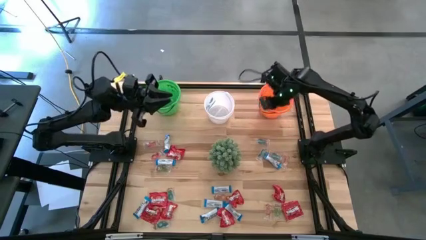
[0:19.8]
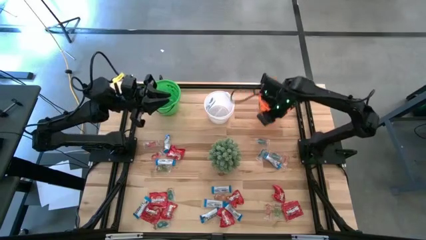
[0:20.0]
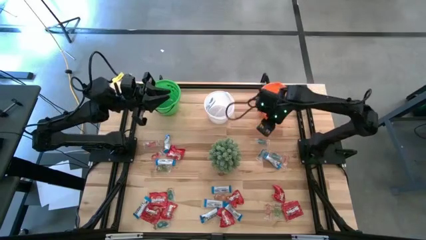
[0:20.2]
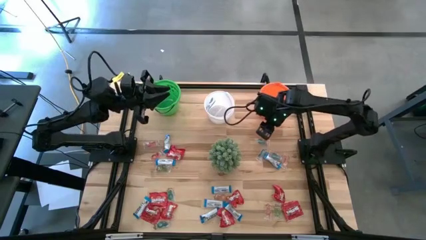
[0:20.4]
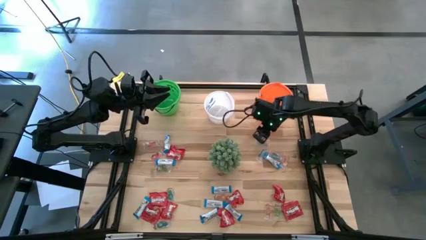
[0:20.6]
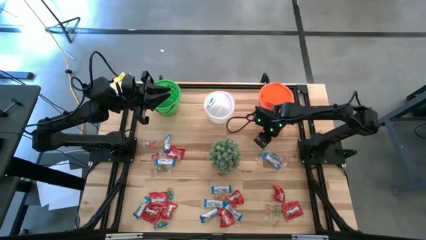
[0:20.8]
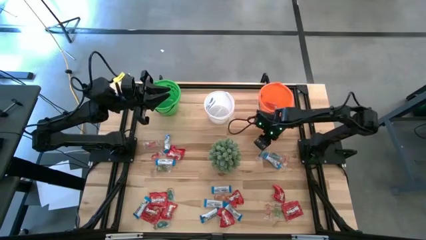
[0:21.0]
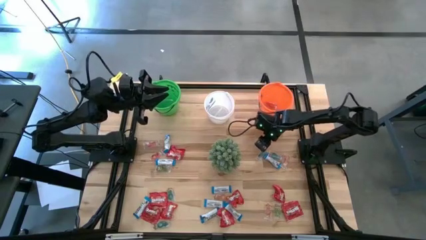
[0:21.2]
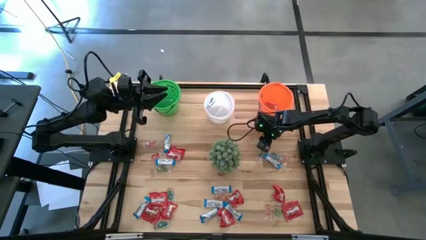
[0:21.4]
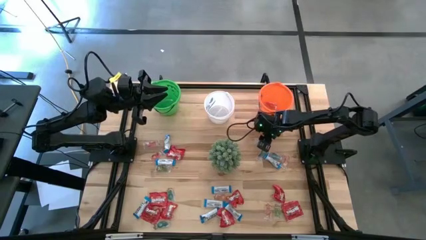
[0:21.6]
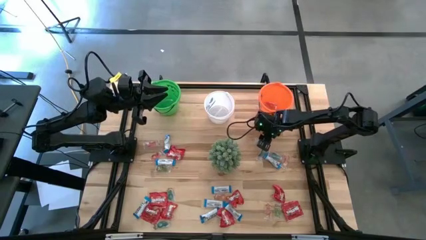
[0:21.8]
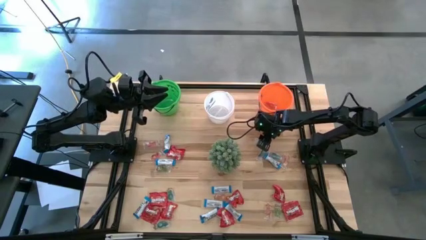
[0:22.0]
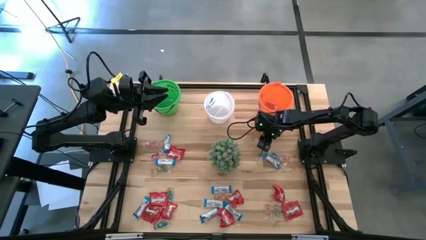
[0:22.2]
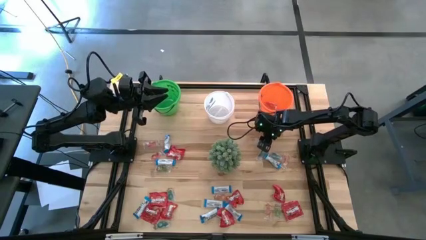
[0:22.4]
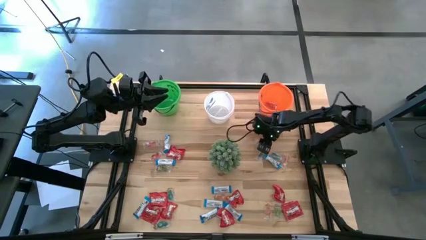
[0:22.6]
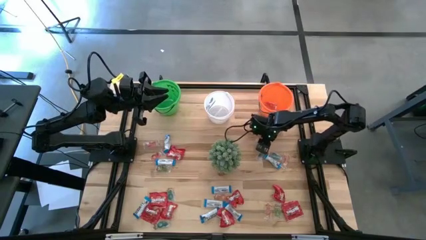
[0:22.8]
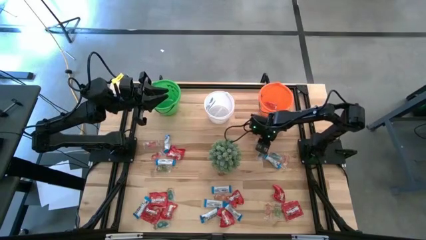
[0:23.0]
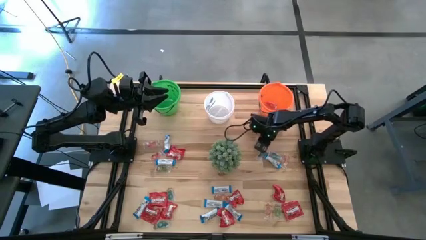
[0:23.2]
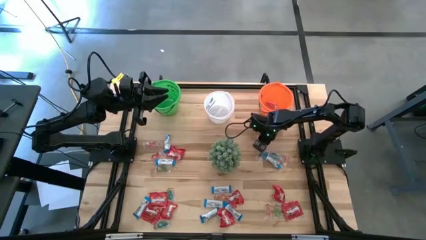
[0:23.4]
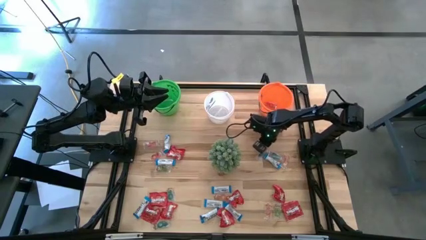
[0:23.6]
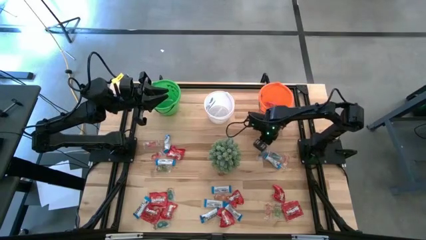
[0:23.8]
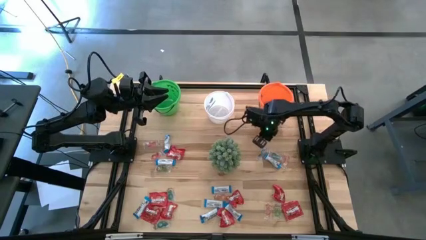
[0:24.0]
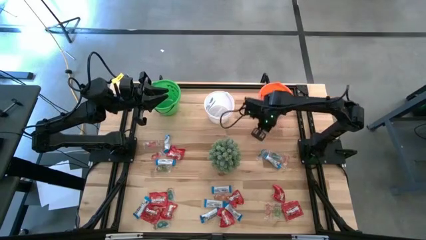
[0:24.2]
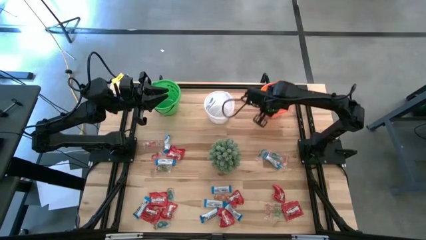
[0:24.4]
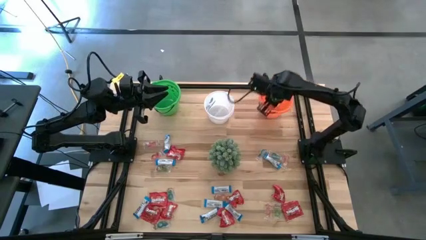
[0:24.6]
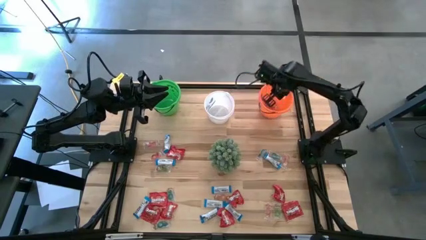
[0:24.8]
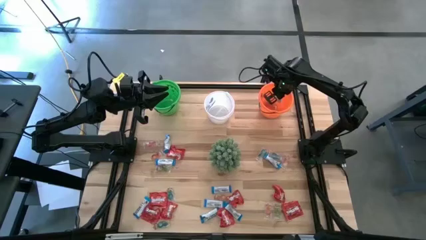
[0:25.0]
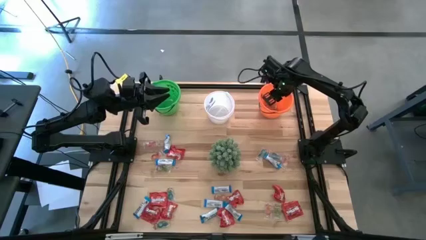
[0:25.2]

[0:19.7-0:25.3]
Task: Sort candy
Put the transparent candy into the orange bucket

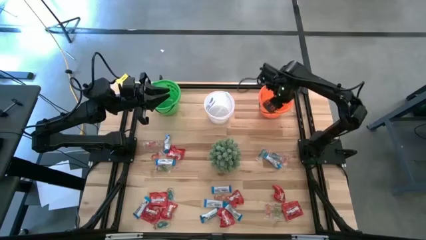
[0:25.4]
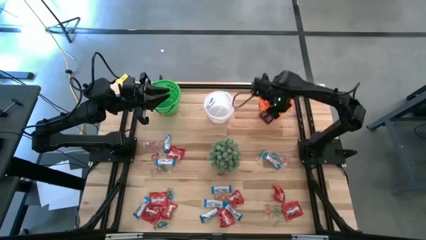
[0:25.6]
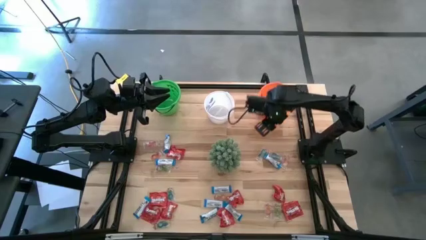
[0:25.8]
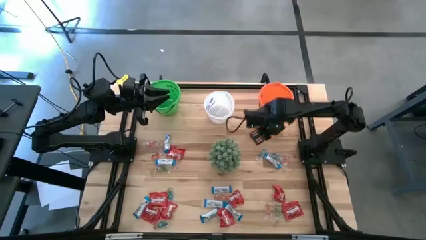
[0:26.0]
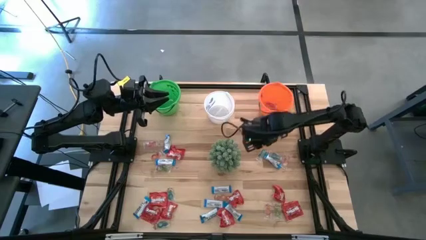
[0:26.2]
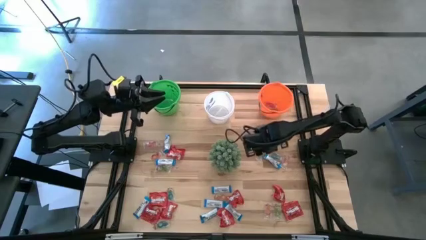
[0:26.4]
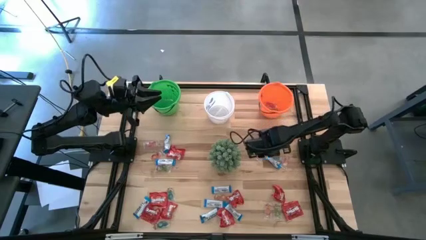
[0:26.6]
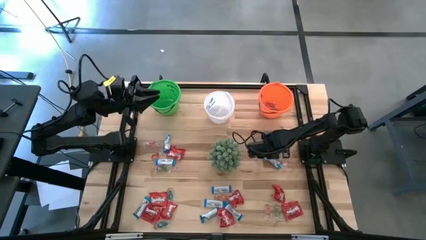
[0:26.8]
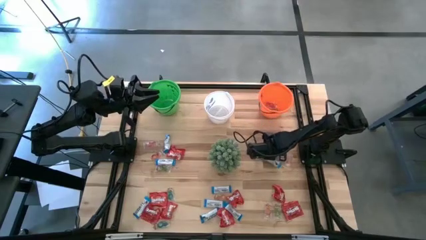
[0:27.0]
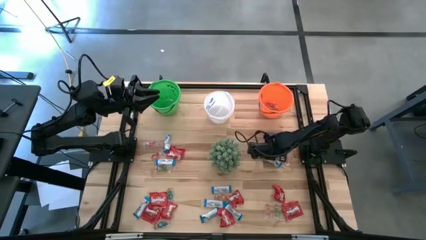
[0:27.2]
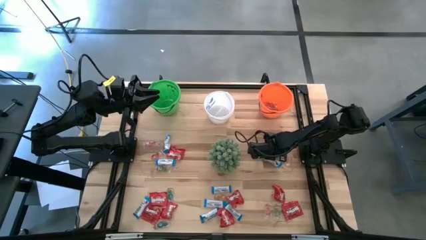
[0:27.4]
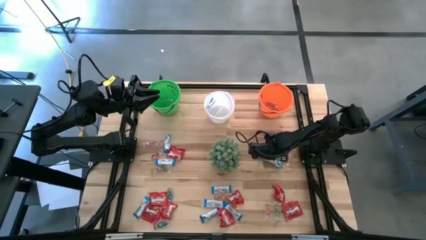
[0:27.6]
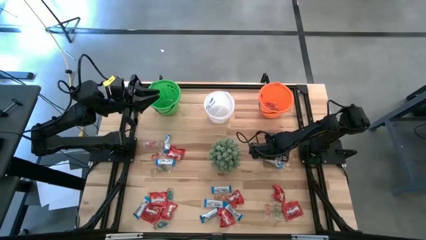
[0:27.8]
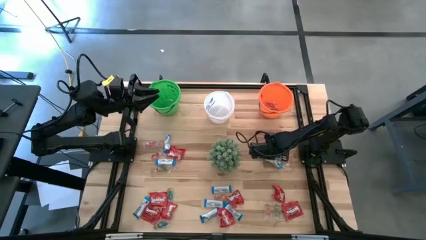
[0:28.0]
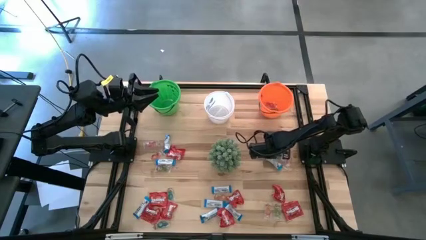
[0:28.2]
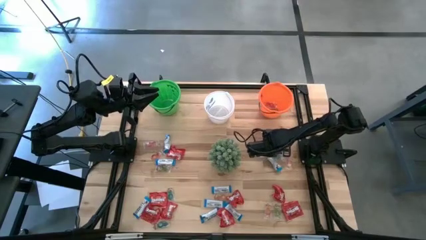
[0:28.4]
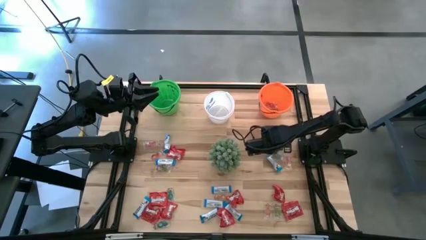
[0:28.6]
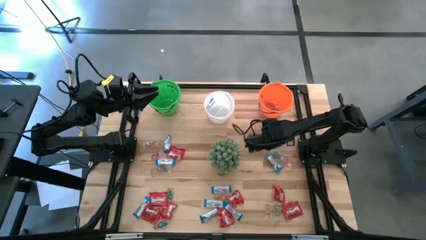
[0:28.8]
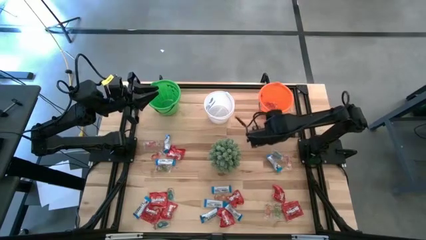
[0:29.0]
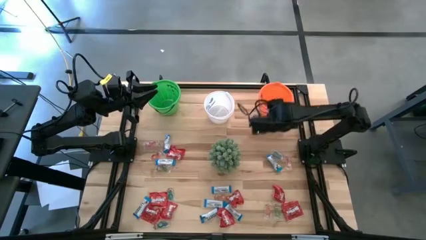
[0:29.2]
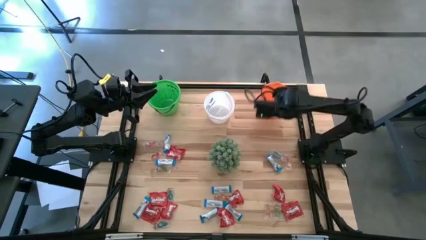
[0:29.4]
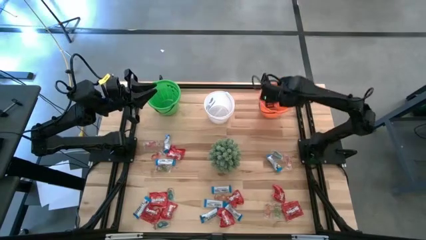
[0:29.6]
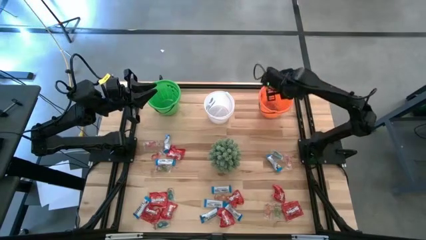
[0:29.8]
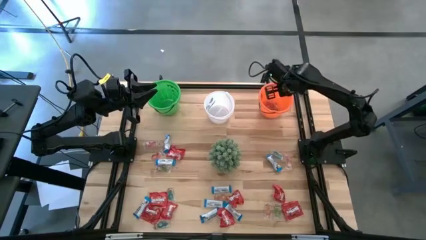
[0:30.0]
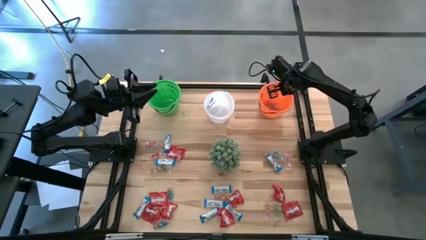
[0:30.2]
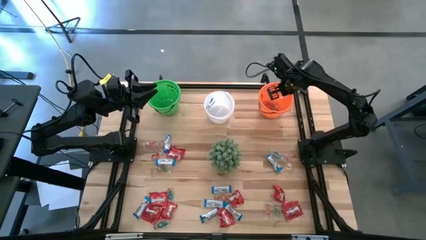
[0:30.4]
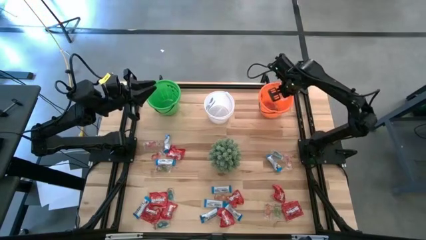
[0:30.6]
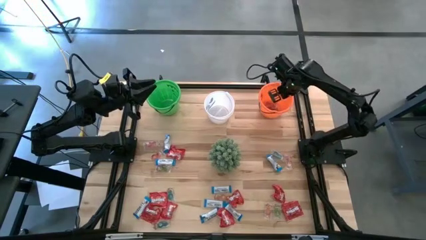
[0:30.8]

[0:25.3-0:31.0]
Put the transparent candy into the orange bucket

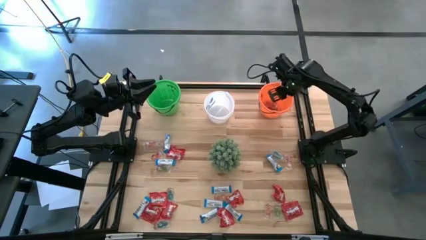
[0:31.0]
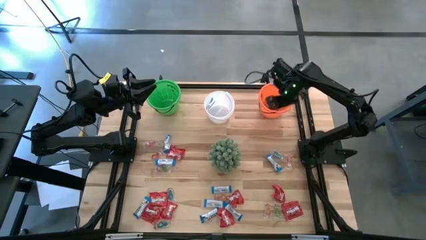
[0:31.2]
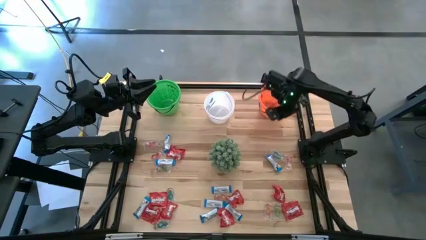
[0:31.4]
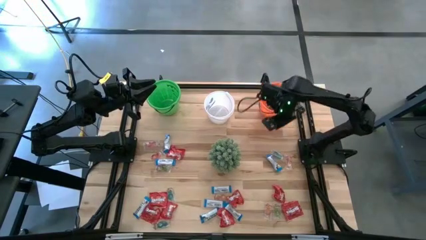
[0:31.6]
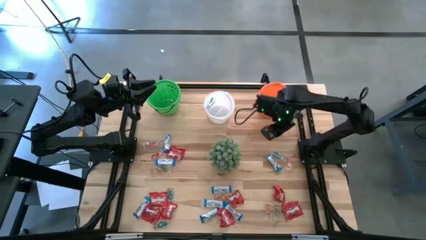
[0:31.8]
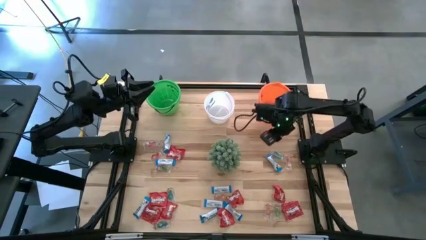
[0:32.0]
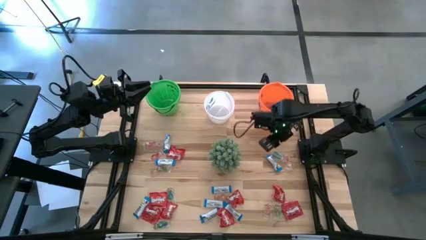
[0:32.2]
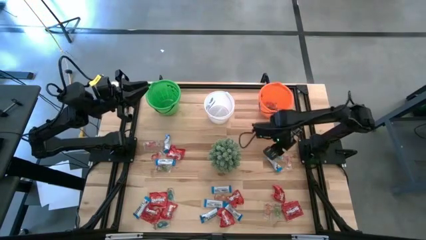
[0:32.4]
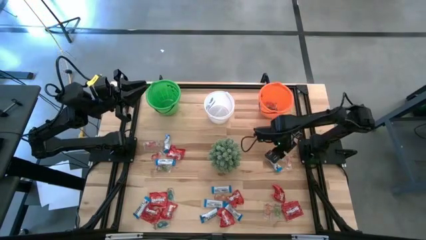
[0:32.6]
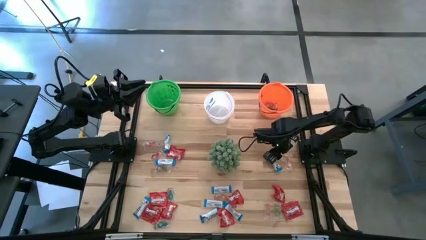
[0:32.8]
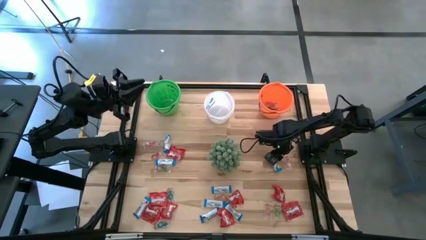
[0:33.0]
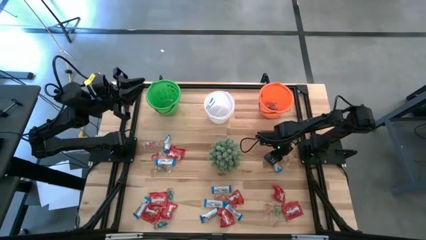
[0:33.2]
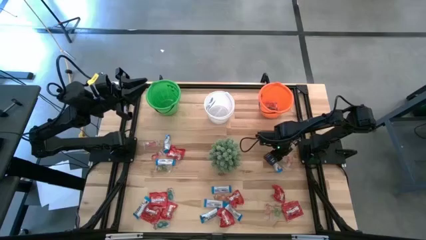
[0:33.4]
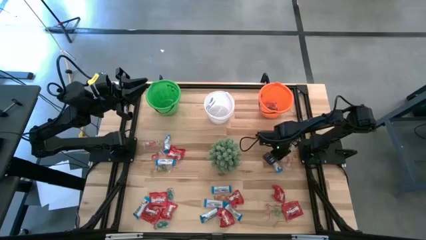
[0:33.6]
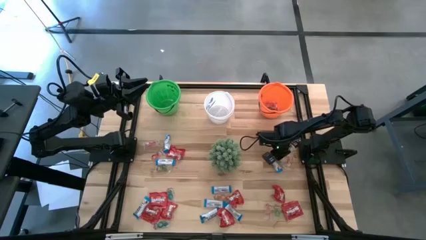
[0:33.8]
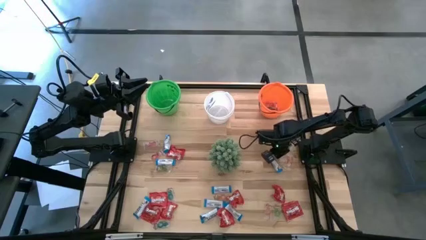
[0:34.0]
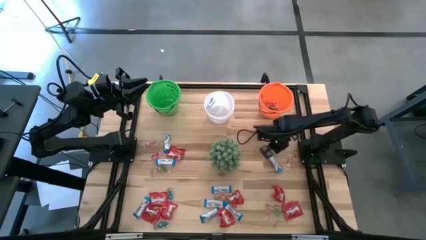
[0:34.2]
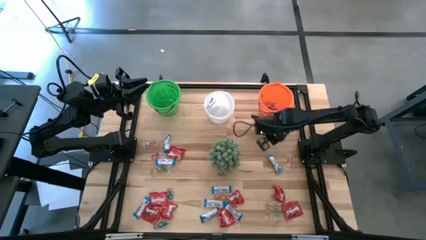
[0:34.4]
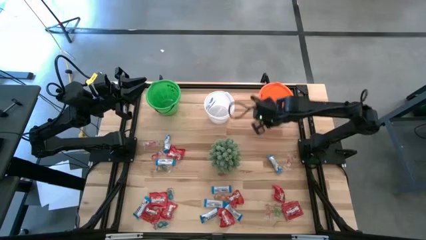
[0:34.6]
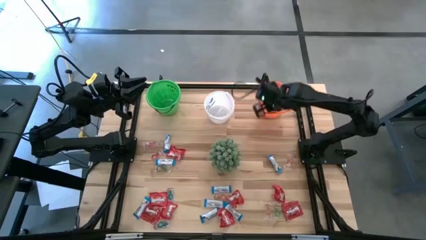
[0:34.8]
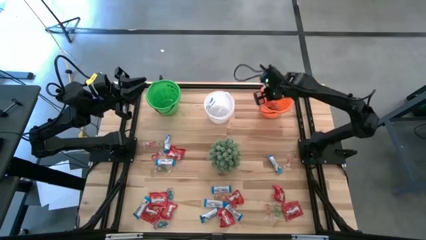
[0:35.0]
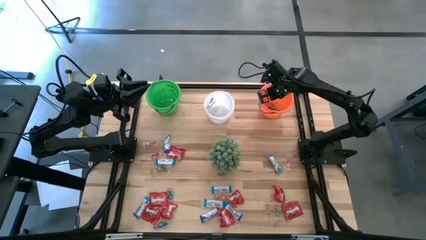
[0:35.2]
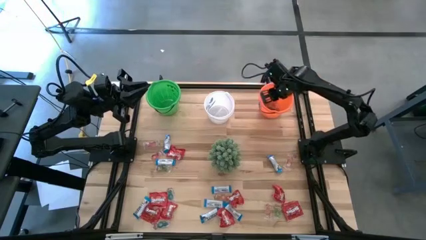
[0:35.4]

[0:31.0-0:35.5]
Put the transparent candy into the orange bucket
